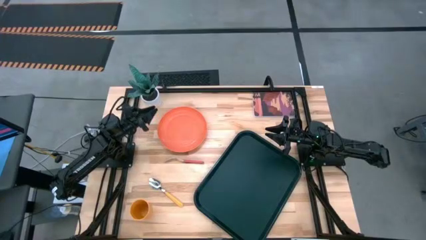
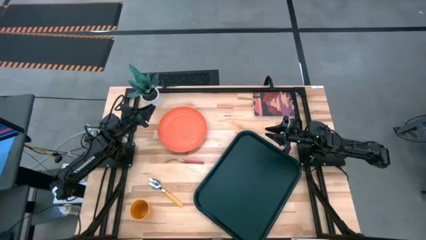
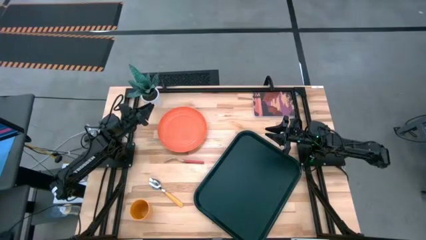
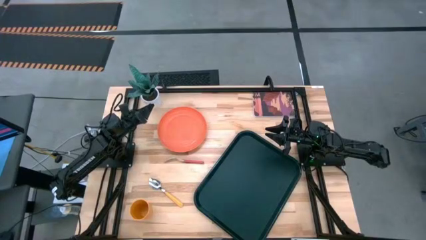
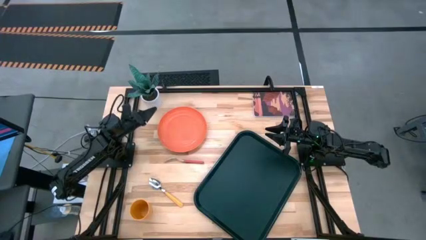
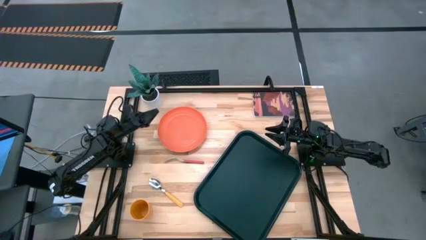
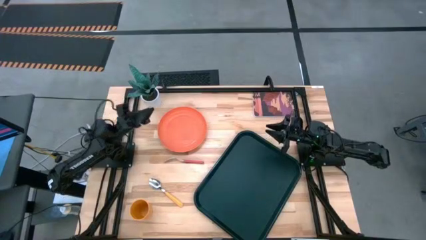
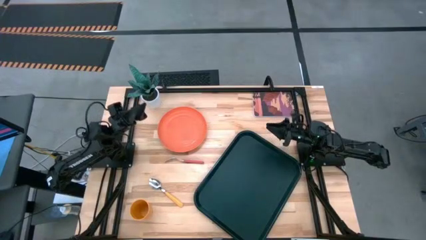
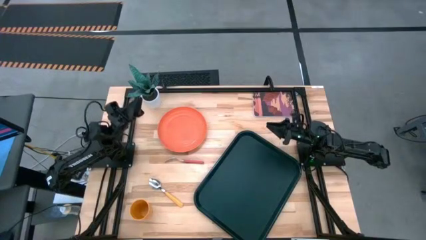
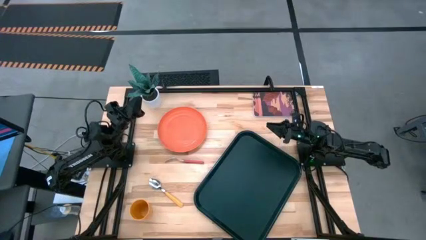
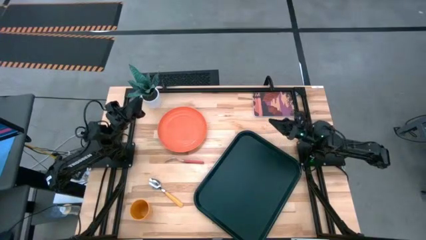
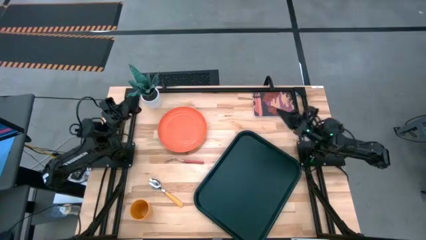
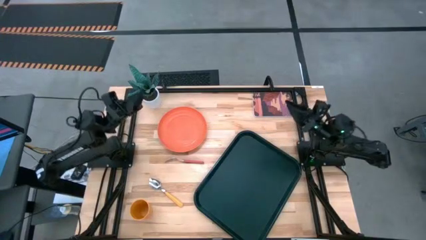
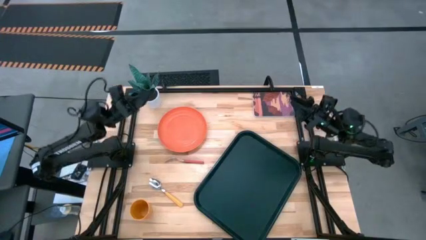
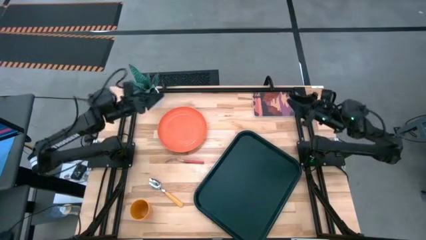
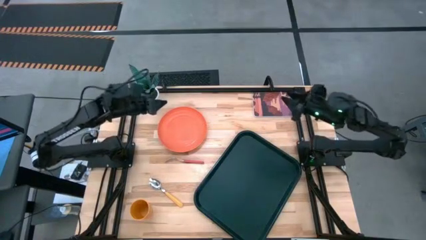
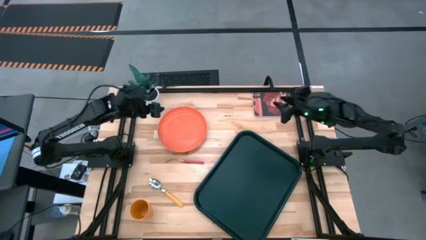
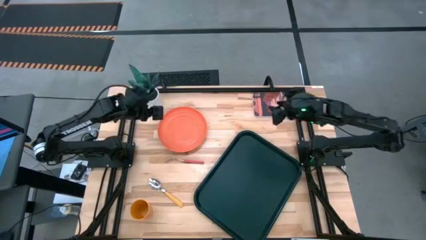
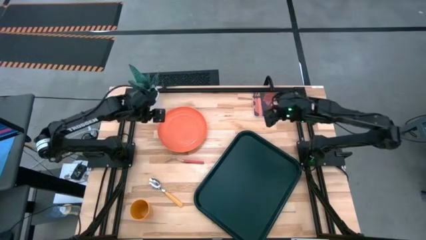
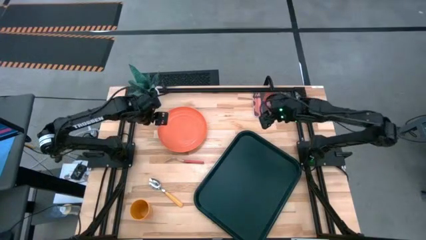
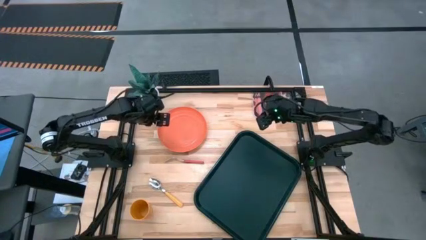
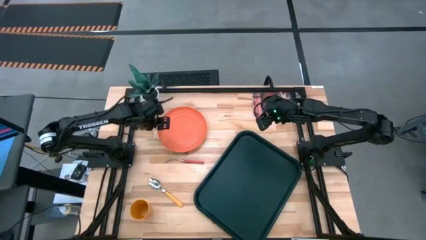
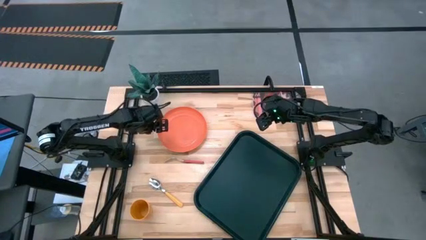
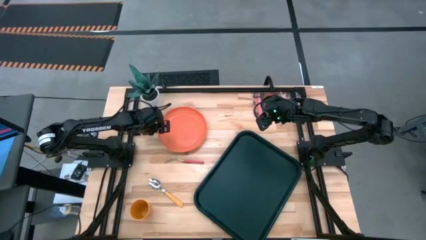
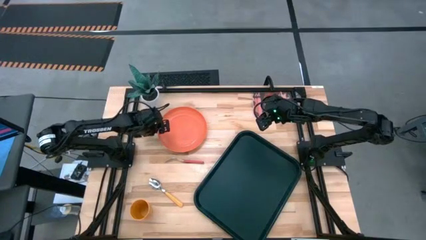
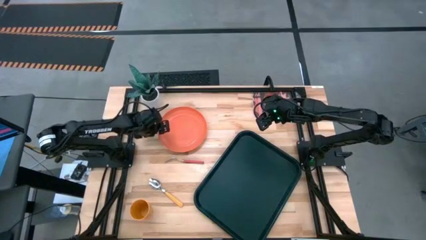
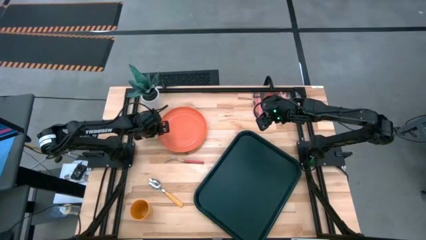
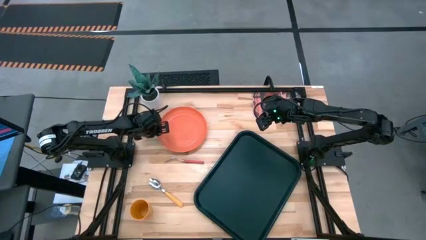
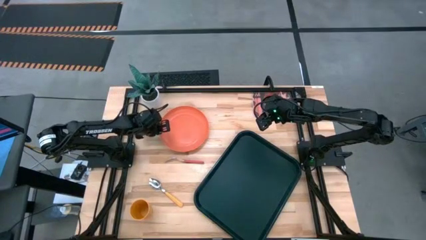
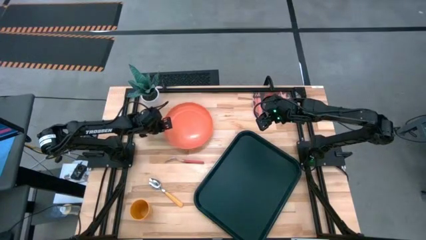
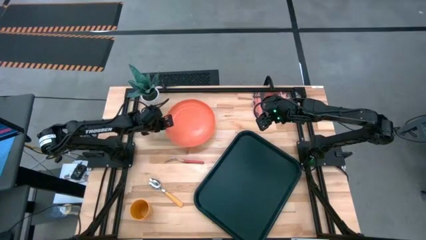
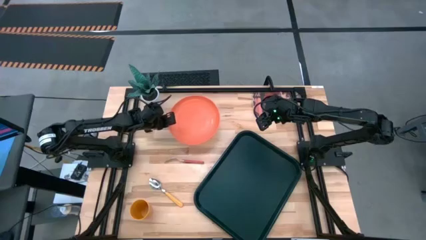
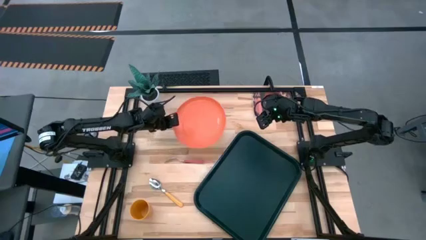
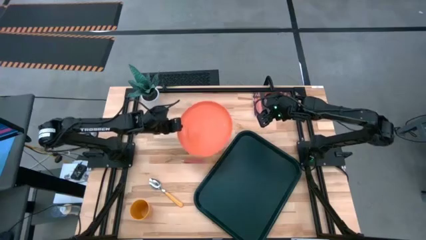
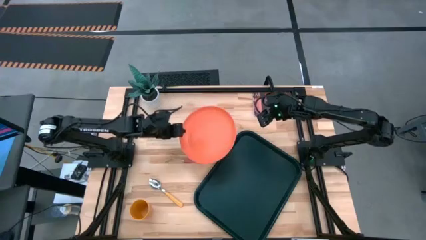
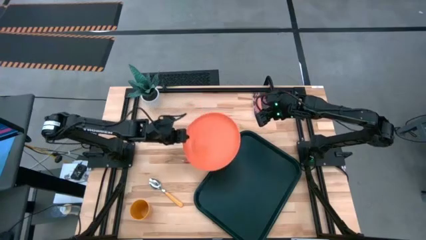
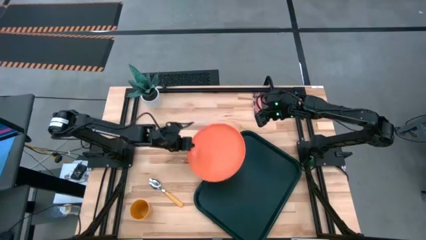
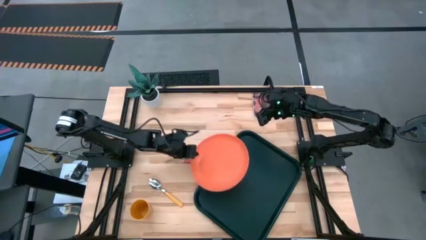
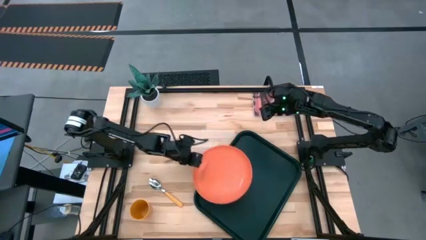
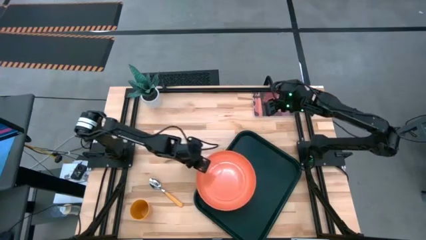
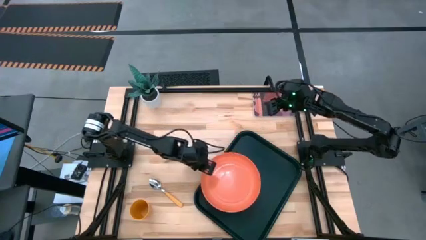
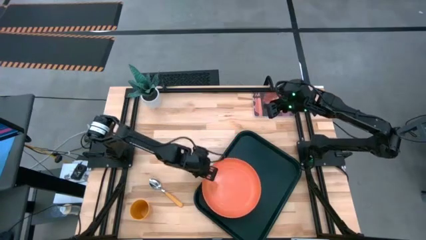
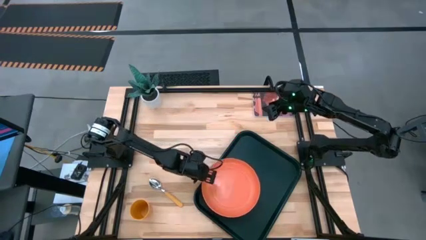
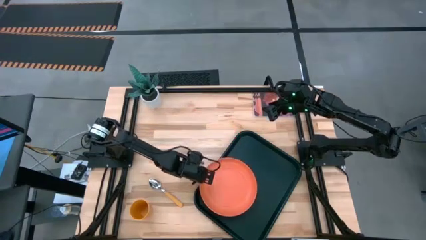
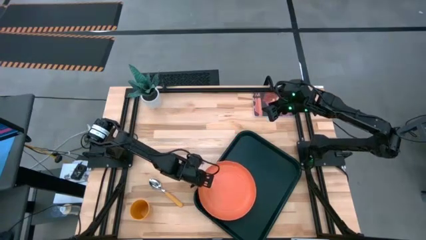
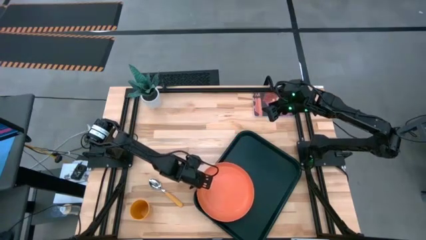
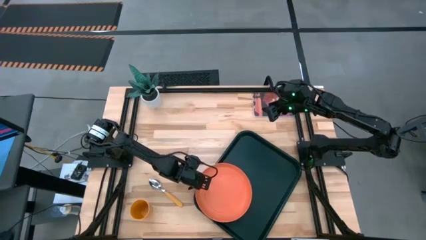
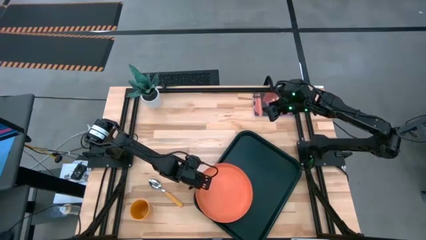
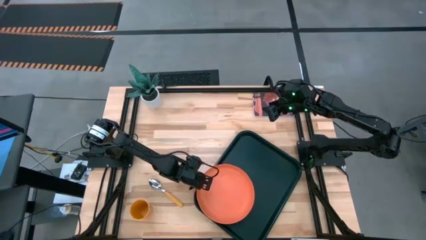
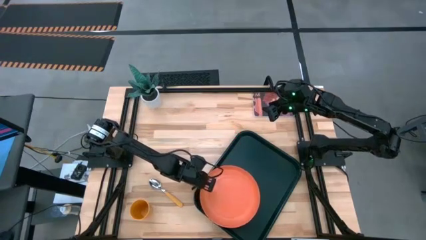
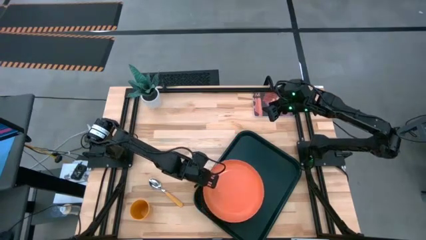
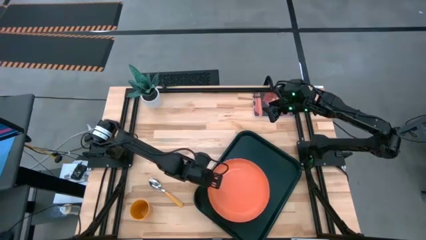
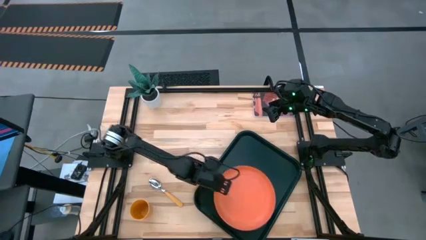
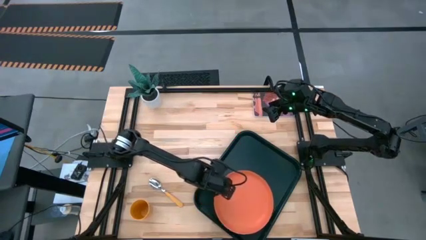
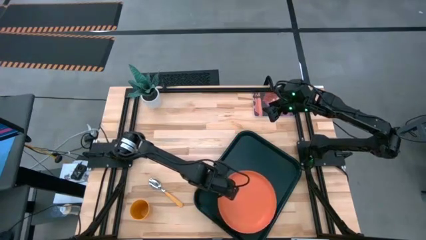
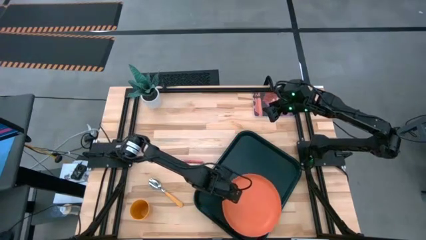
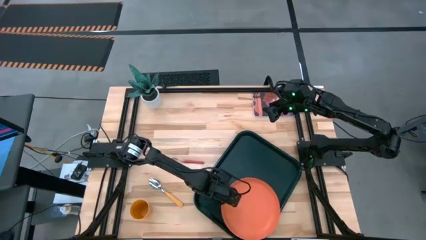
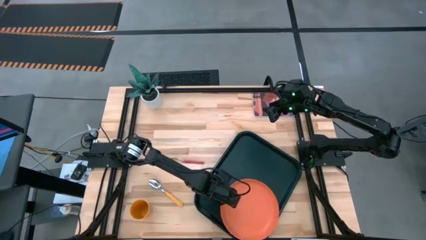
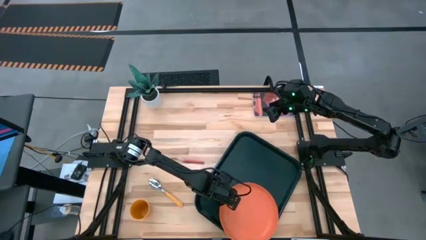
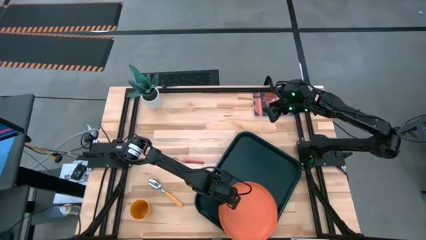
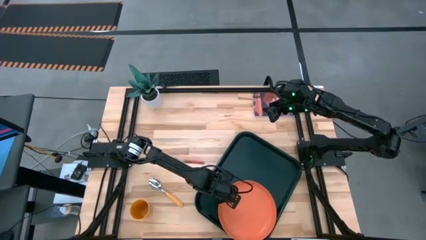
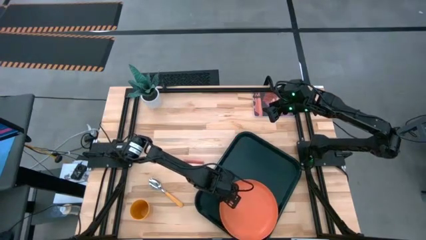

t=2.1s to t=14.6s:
Task: Pick and place plate/cup/fork/spoon on tray
Put the orange plate on the black serving tray

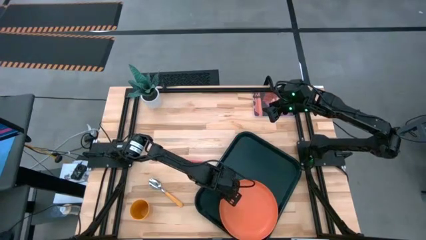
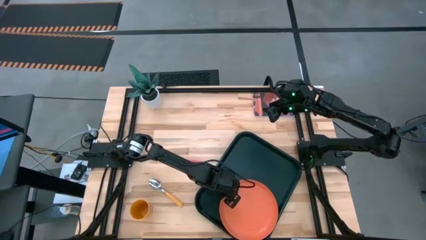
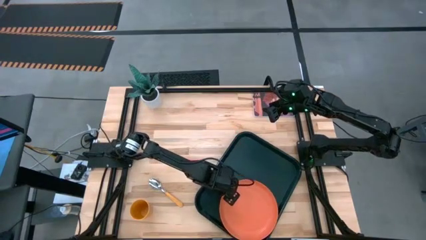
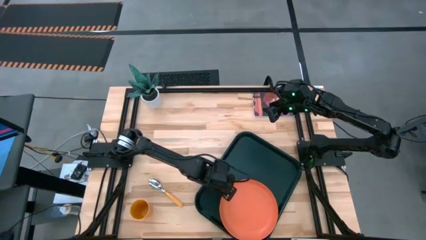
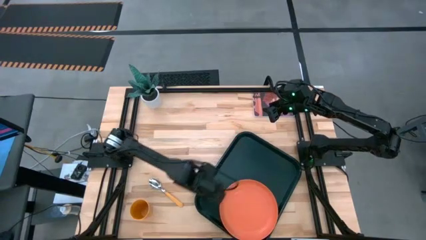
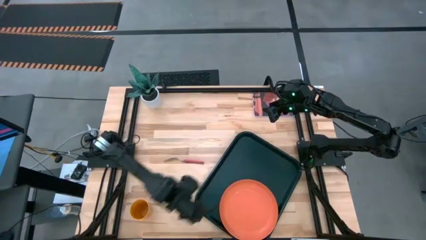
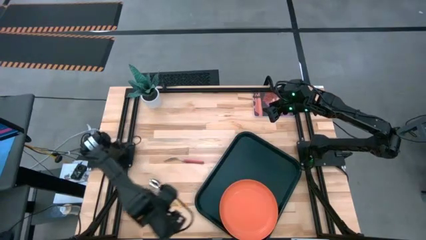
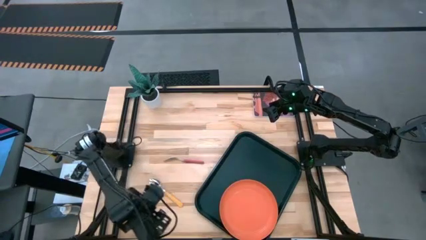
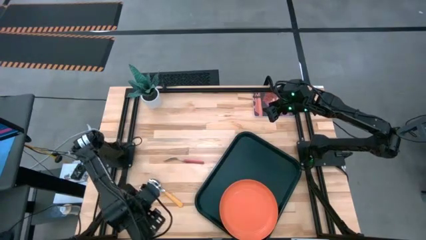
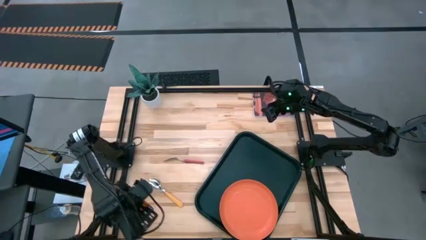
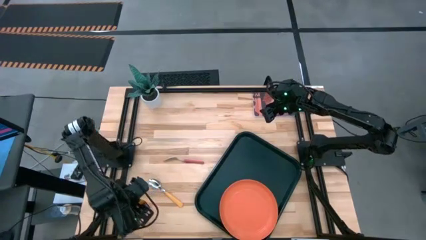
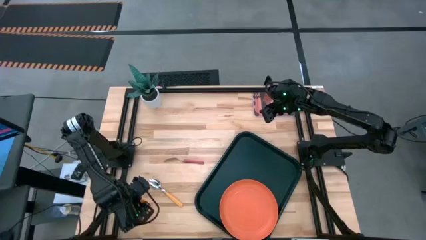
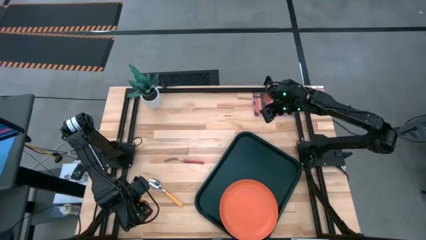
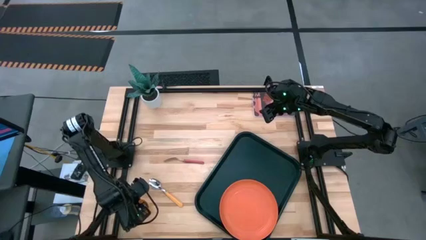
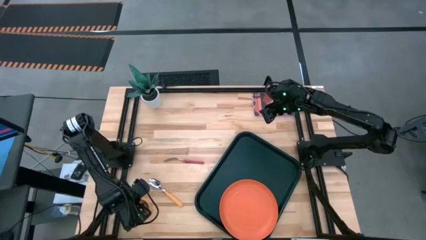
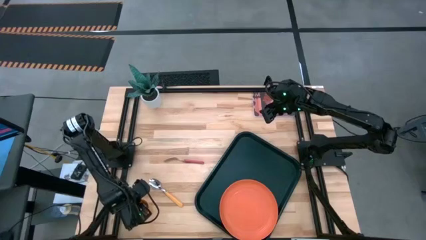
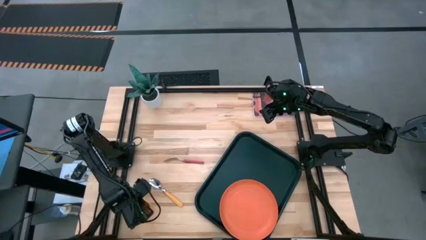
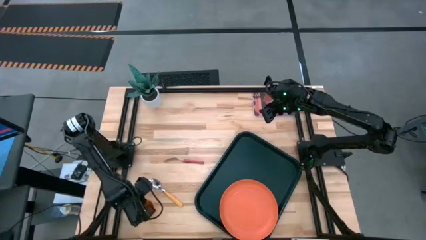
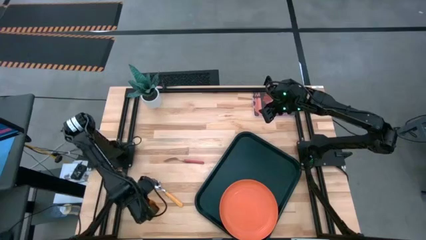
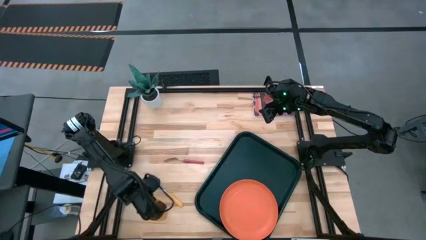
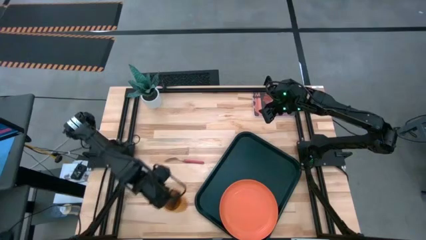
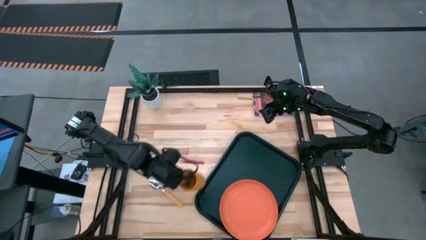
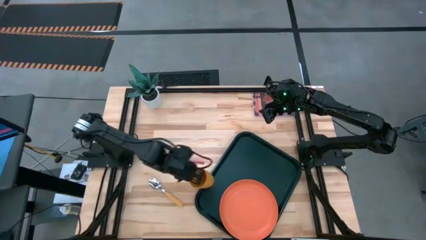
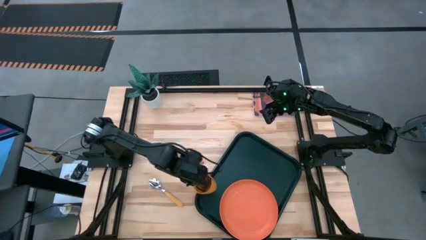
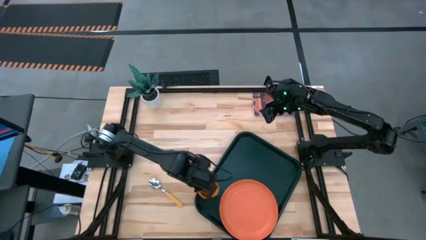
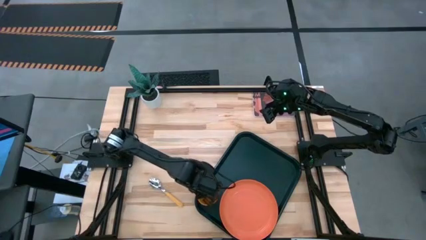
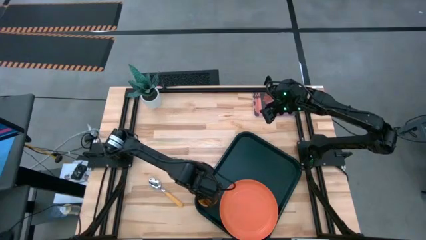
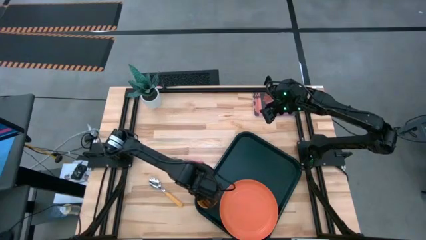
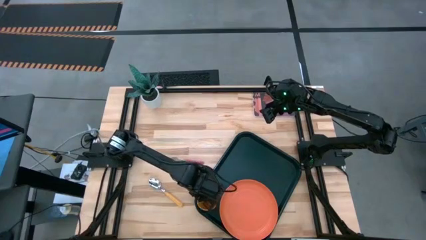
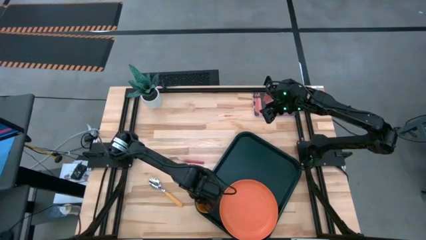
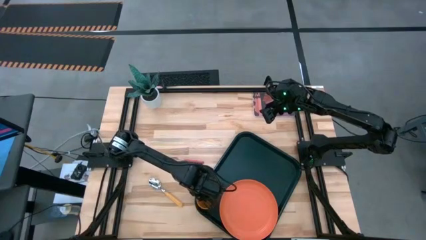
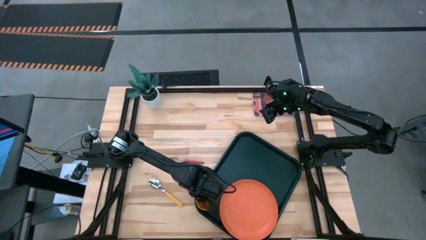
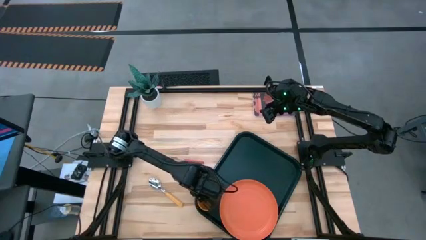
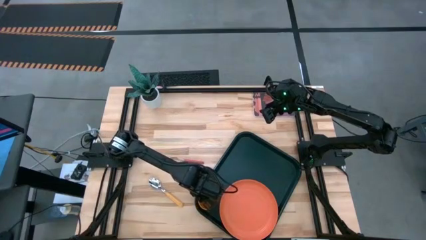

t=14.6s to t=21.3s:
Put the yellow cup on the black serving tray at the left of the orange plate
